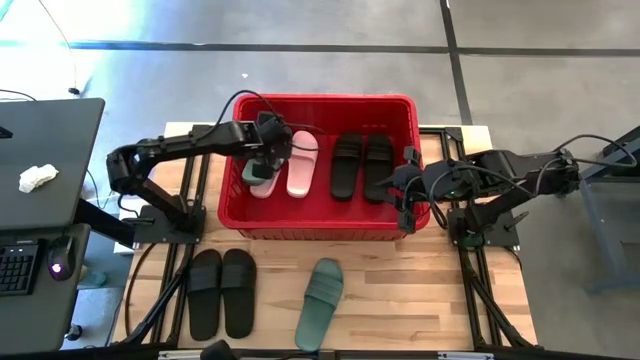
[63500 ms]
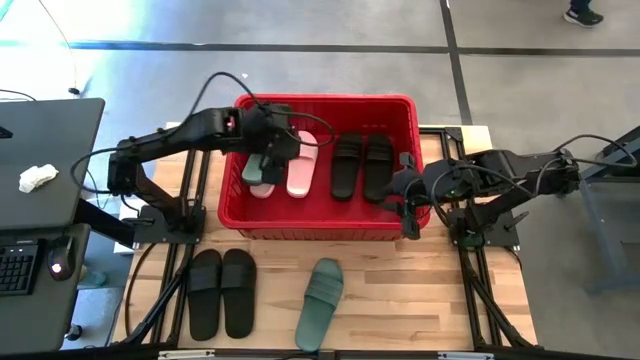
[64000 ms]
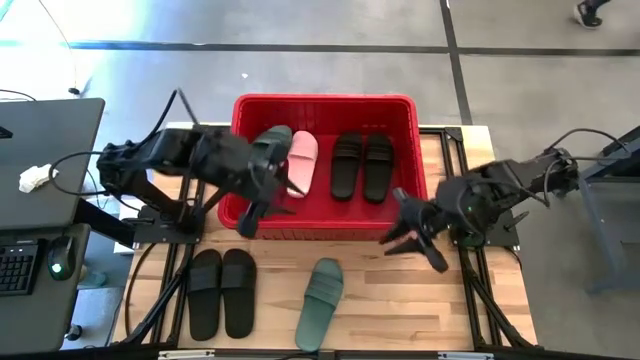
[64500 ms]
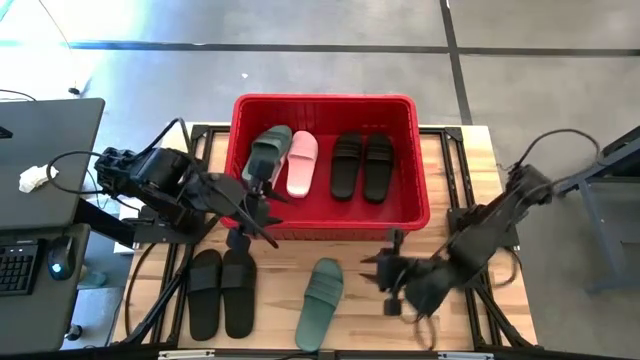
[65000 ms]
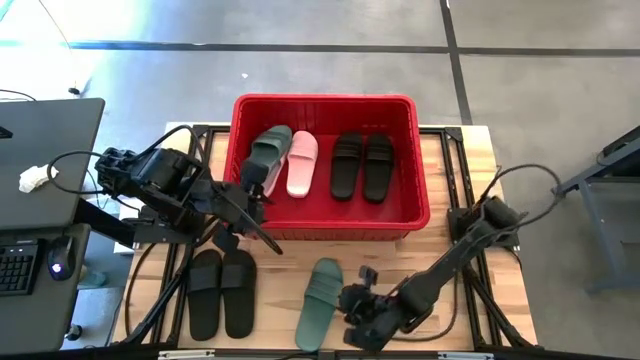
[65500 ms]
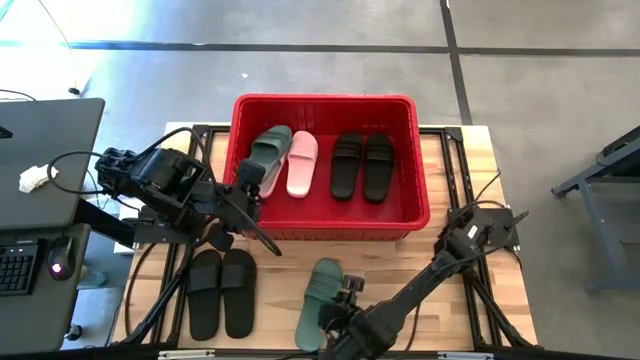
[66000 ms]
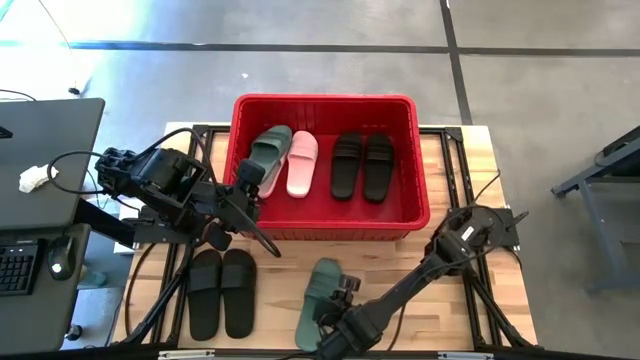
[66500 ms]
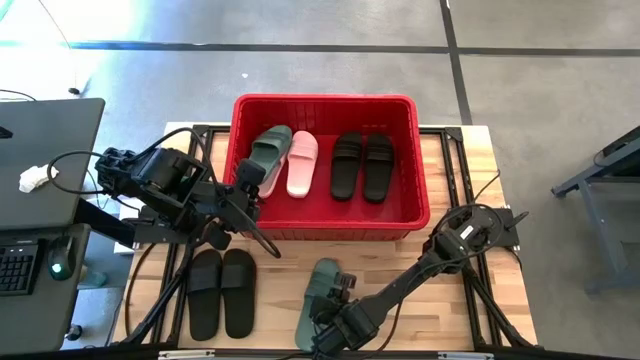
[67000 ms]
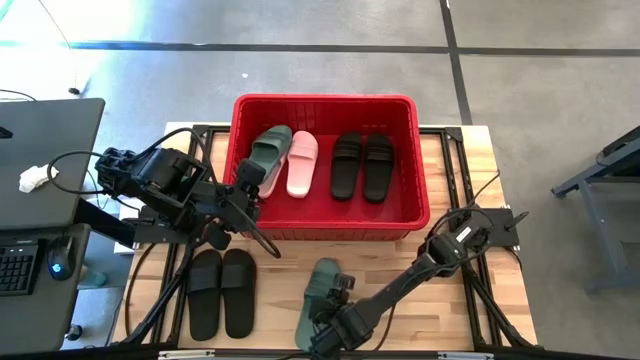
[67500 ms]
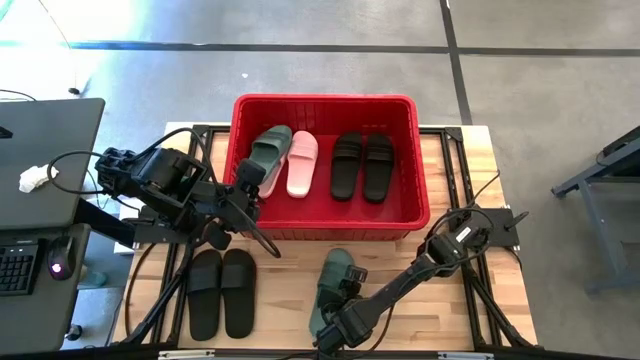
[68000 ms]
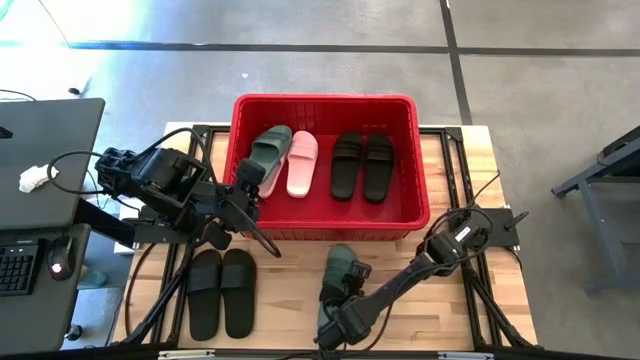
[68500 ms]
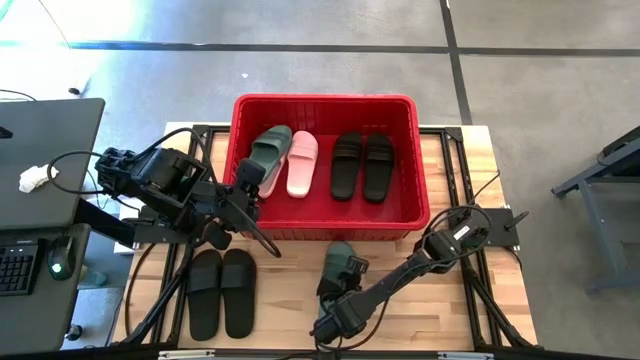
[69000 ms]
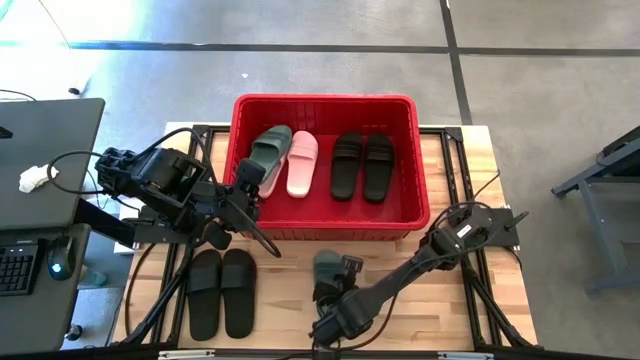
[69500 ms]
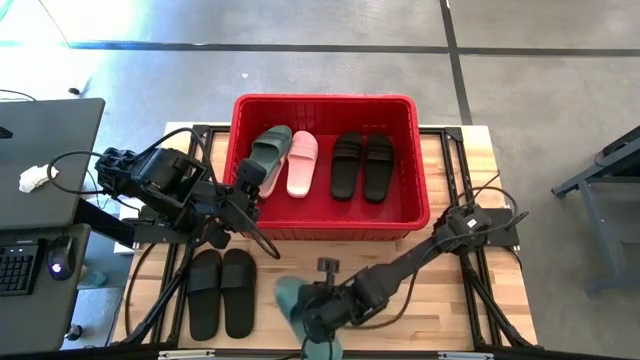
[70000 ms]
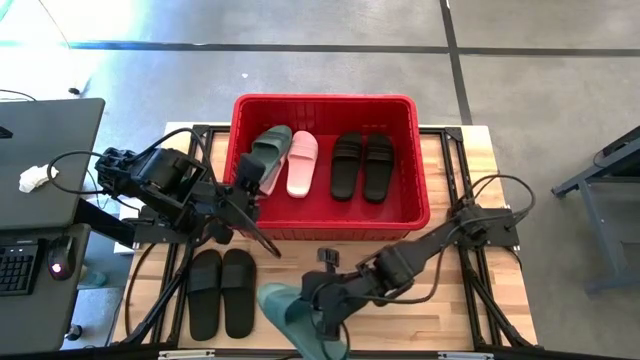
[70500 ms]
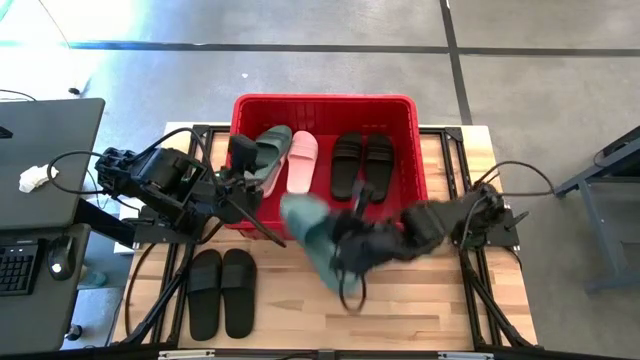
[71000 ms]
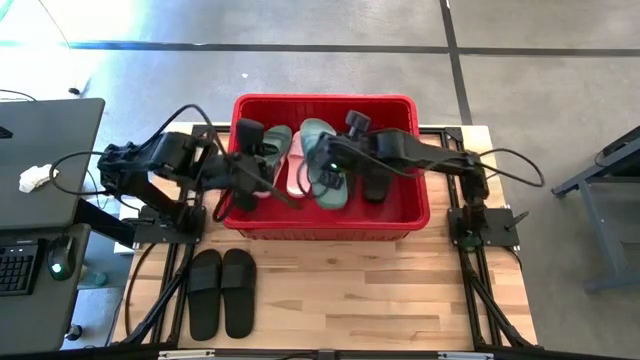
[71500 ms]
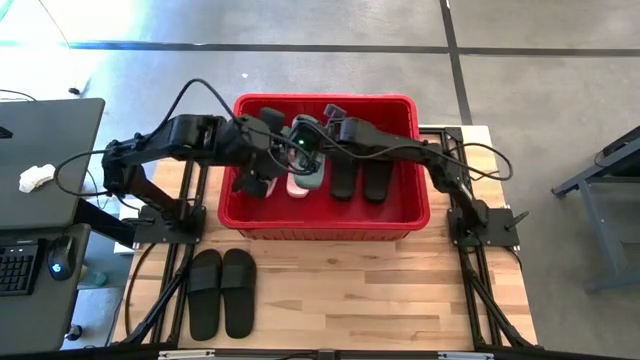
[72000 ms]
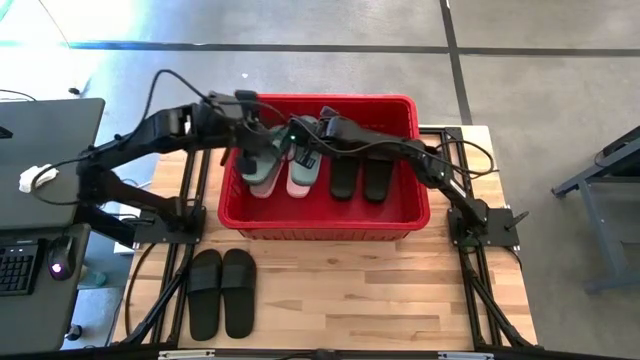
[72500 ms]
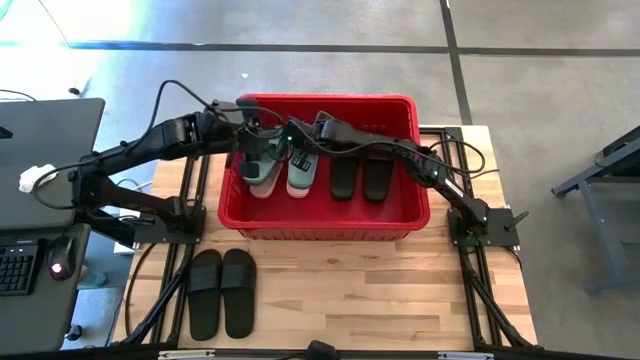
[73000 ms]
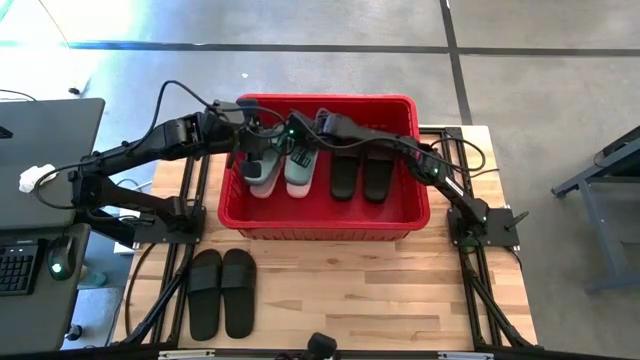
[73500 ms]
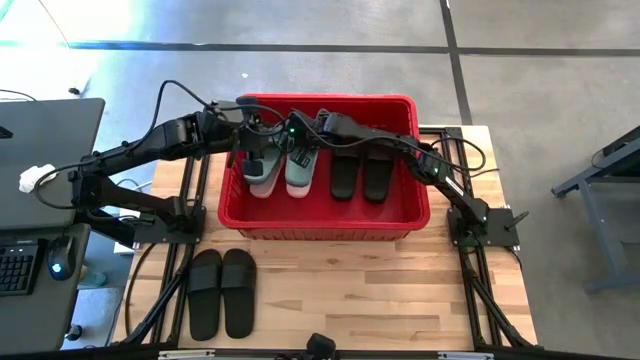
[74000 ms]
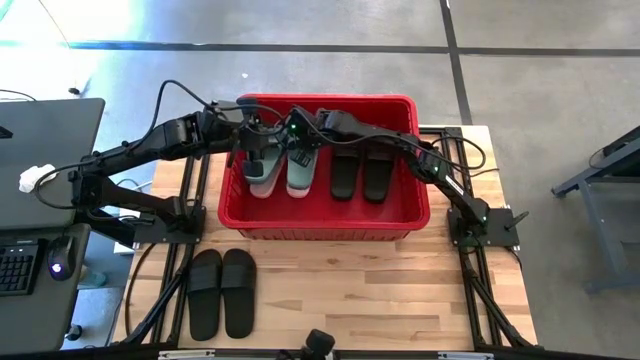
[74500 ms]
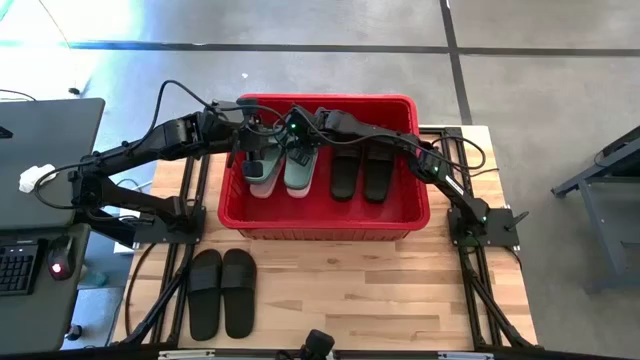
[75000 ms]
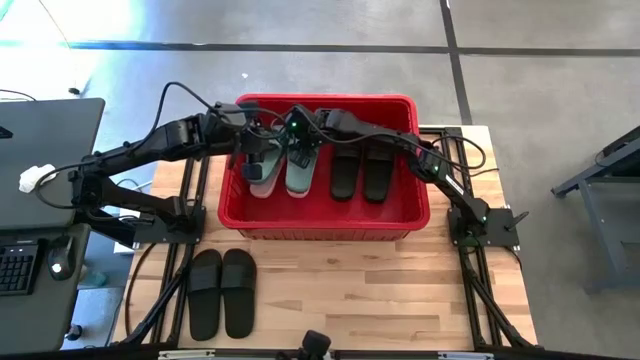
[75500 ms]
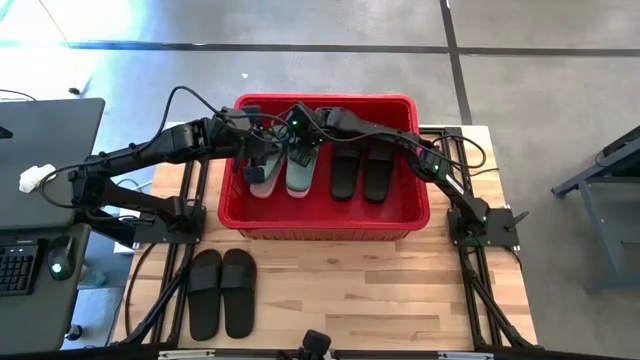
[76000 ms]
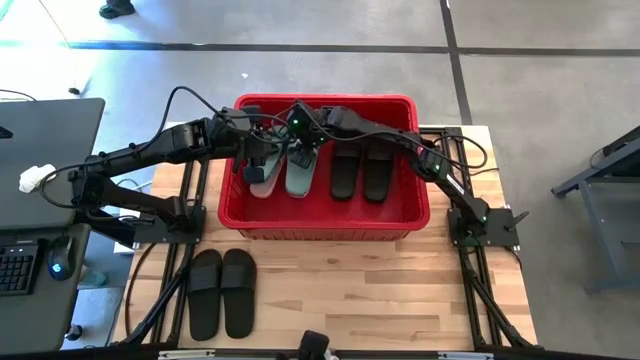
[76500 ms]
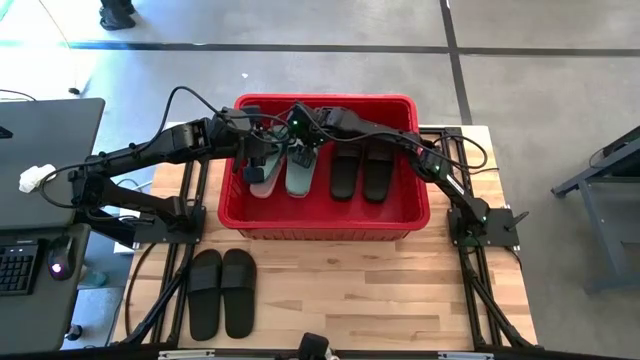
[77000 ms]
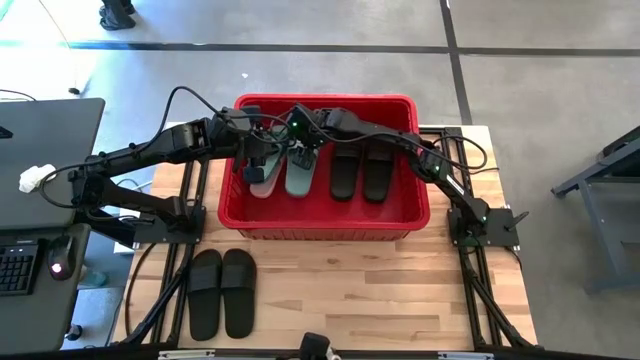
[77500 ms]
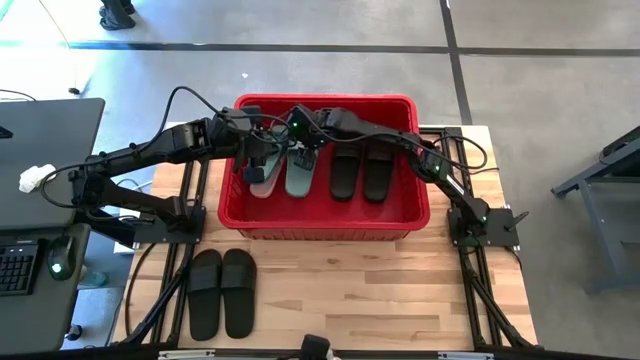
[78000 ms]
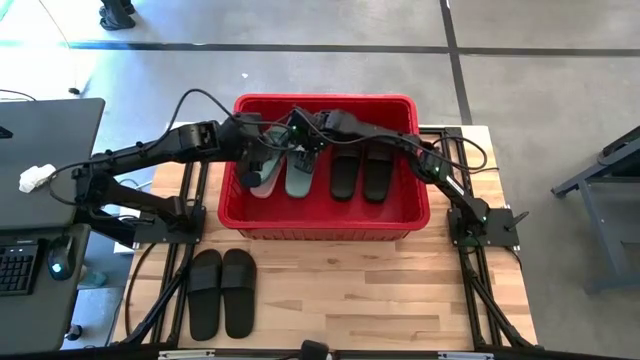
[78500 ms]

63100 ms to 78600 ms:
Task: Pick and place slides into bin
Put the green slide into the red bin

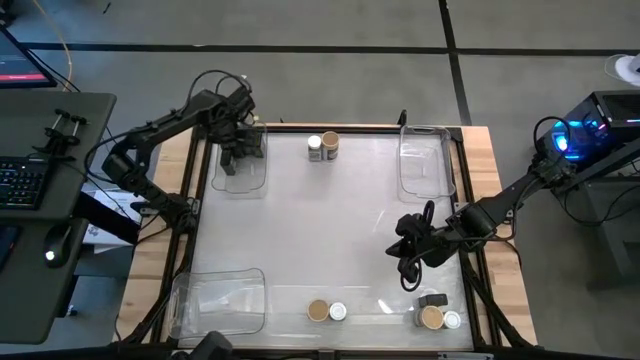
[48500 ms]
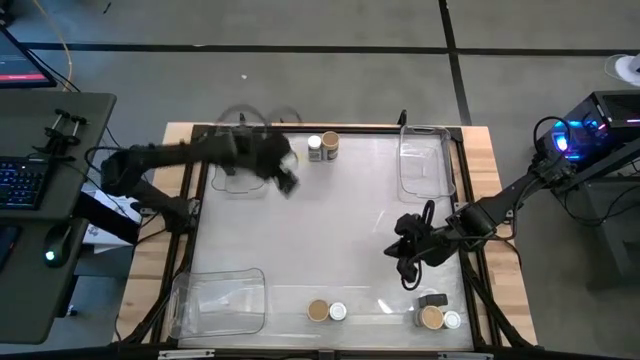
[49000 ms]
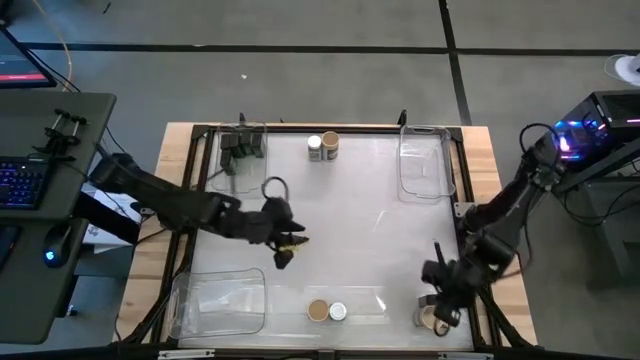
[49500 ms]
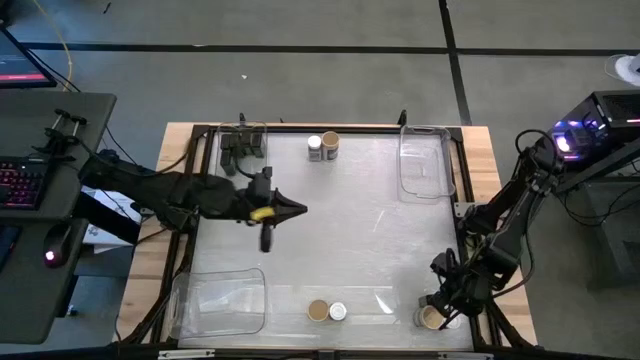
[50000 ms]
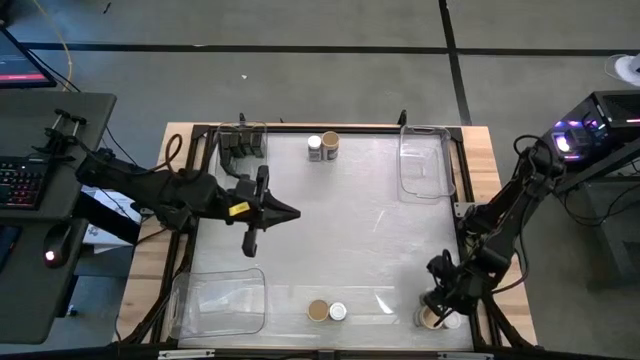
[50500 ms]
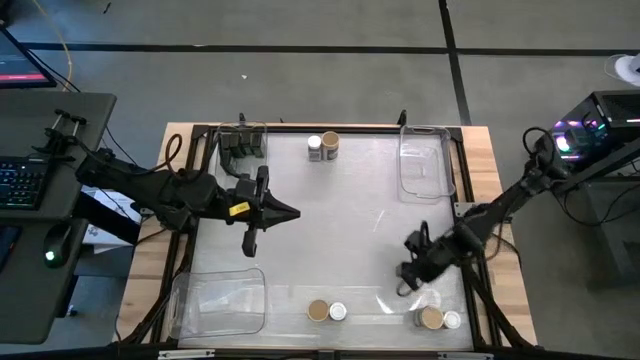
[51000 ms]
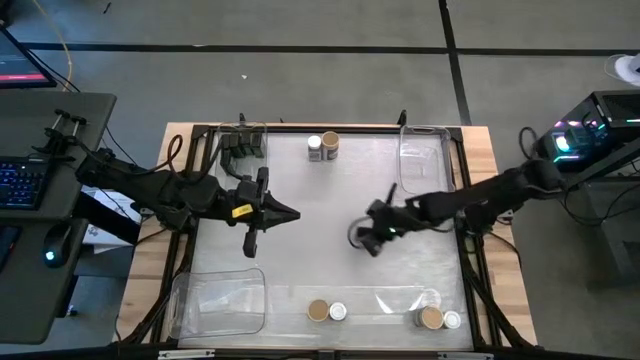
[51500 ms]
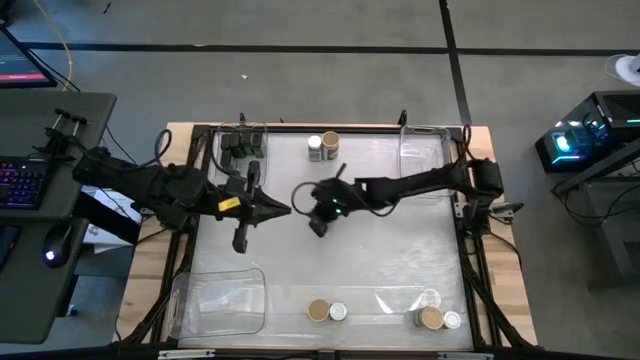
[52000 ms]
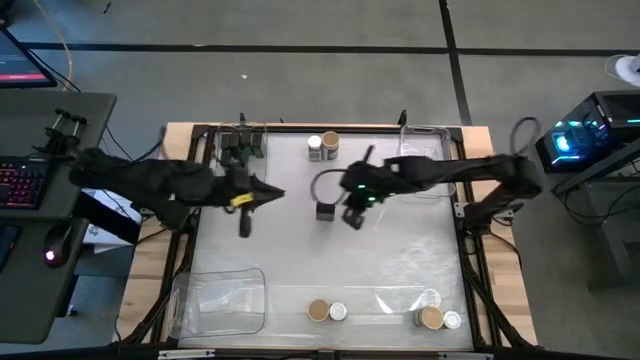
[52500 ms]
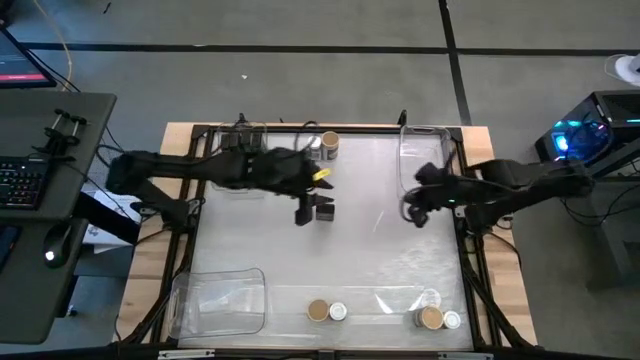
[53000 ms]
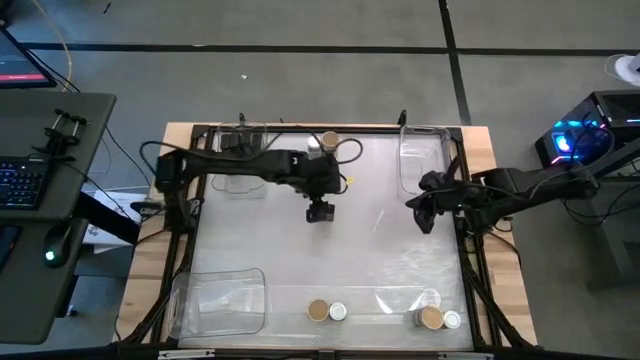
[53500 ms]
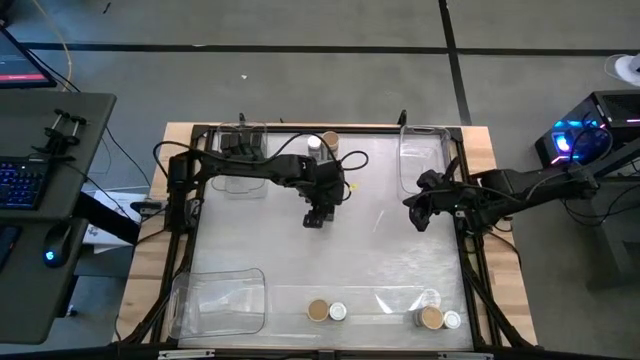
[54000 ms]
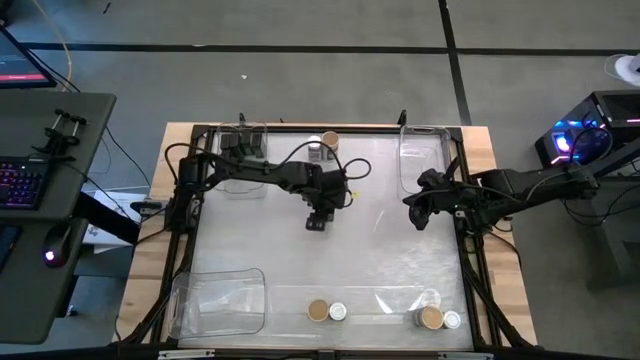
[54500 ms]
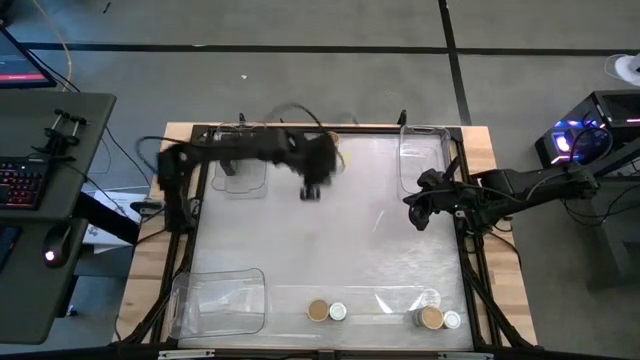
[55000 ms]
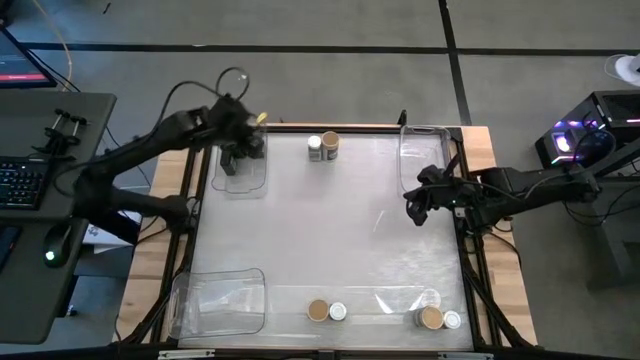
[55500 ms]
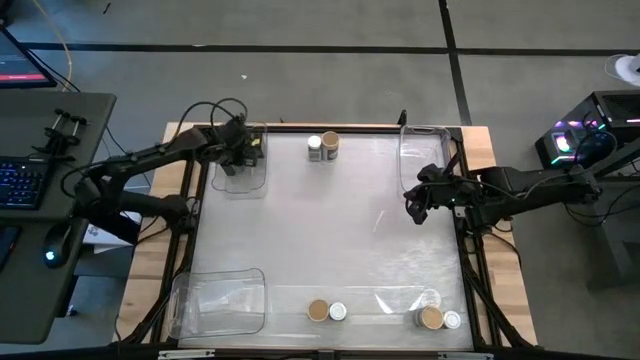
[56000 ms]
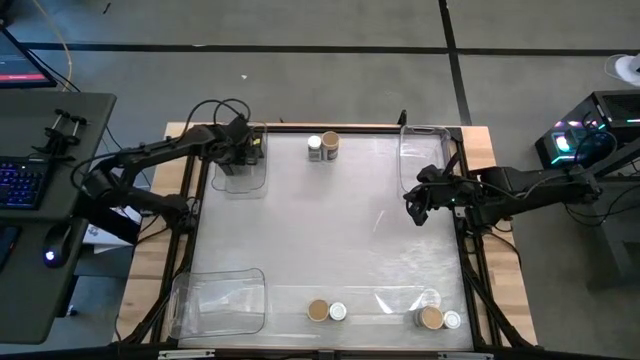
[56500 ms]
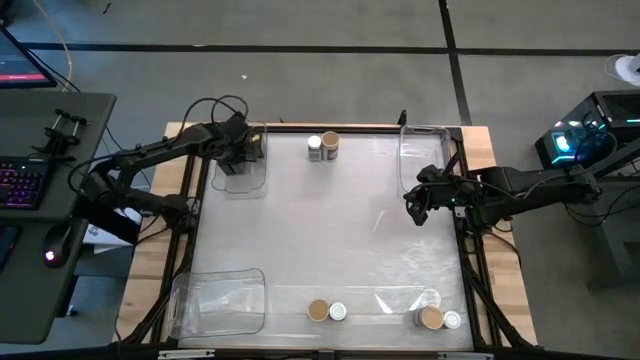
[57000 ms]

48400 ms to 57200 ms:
Task: Sort spices by type
Put the black seasoning can into the top left transparent bin
